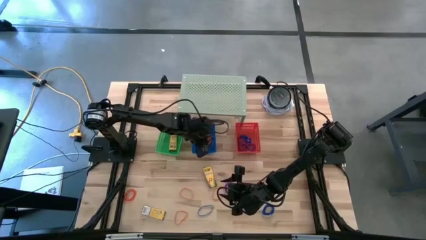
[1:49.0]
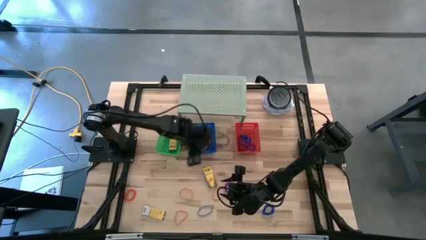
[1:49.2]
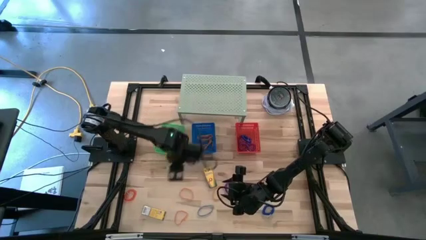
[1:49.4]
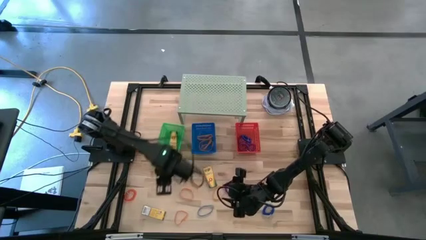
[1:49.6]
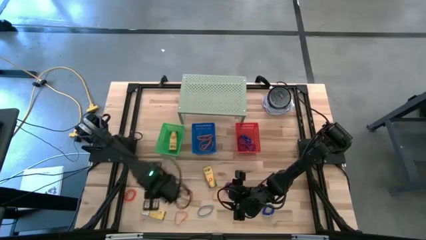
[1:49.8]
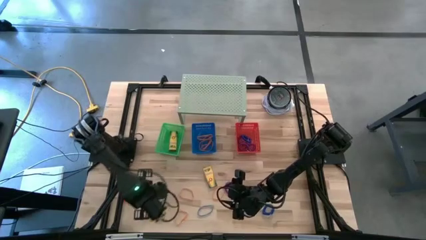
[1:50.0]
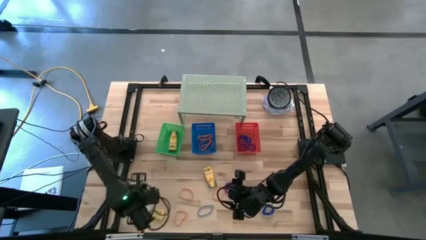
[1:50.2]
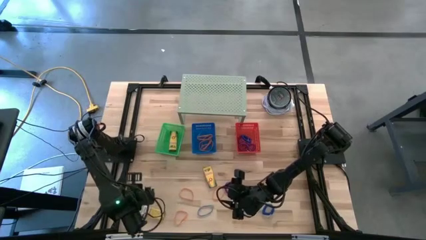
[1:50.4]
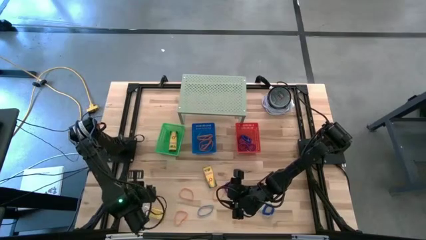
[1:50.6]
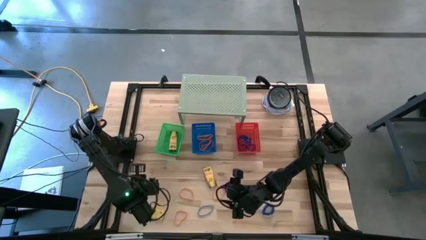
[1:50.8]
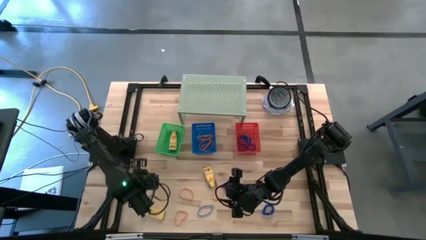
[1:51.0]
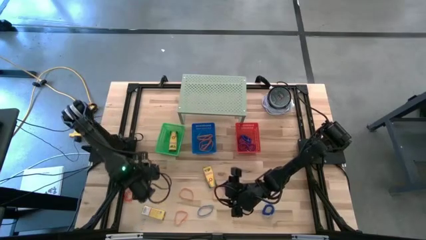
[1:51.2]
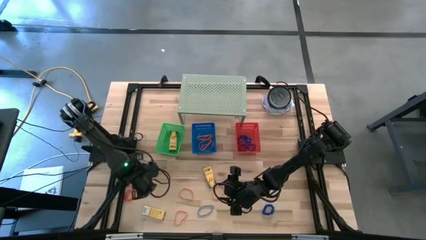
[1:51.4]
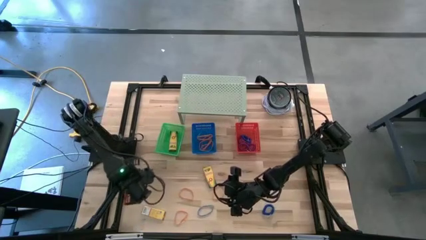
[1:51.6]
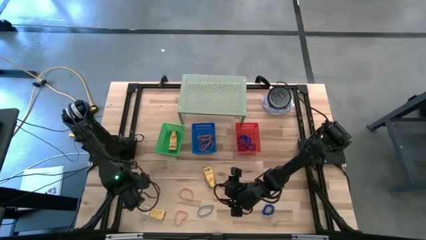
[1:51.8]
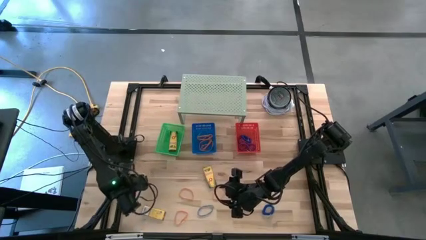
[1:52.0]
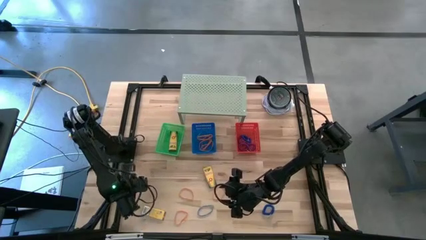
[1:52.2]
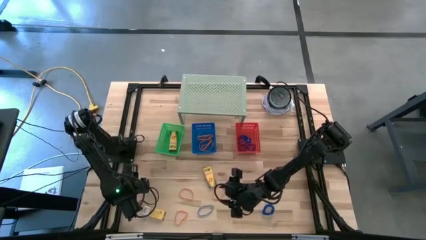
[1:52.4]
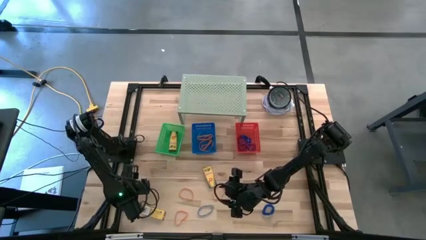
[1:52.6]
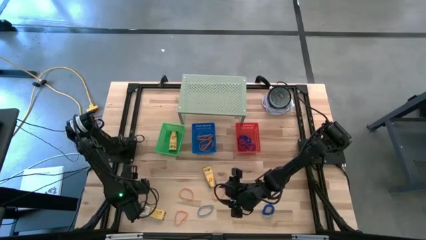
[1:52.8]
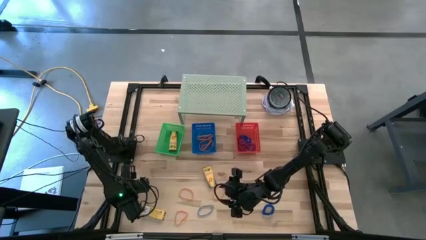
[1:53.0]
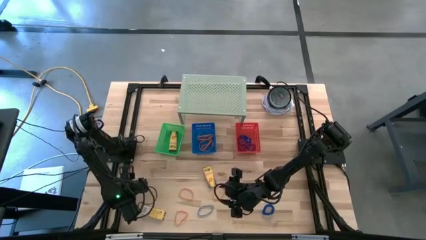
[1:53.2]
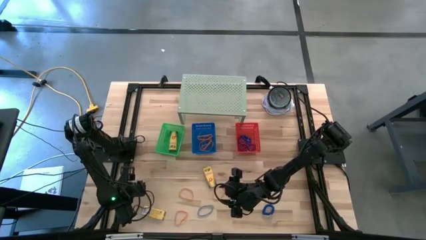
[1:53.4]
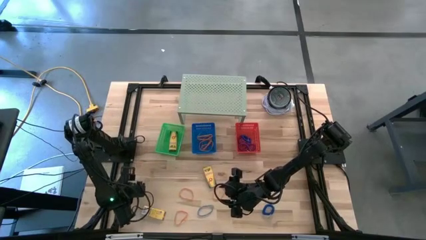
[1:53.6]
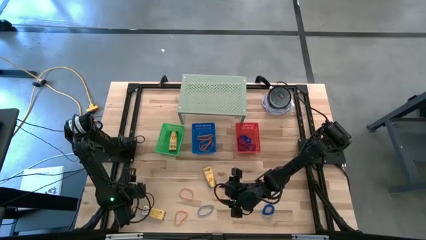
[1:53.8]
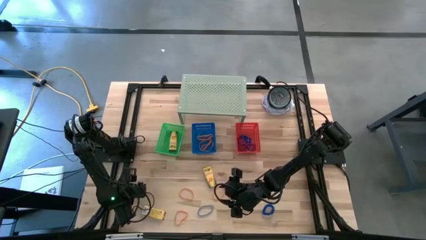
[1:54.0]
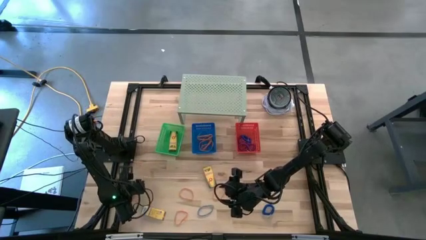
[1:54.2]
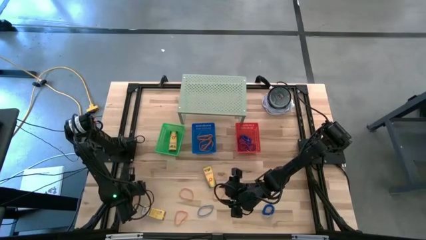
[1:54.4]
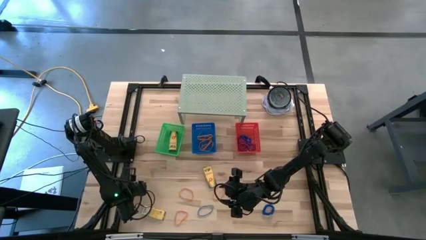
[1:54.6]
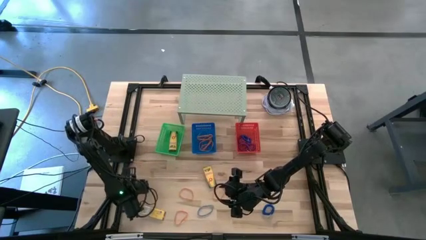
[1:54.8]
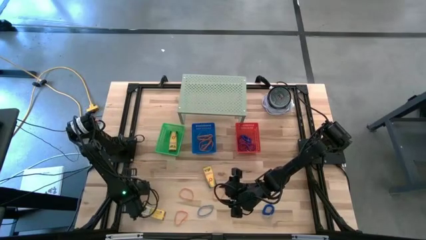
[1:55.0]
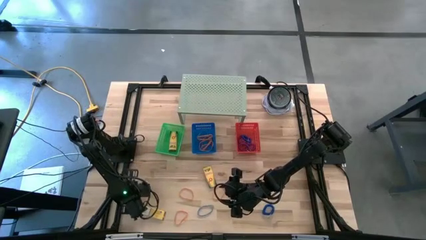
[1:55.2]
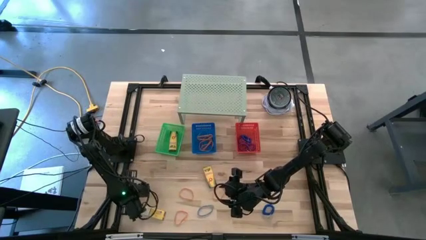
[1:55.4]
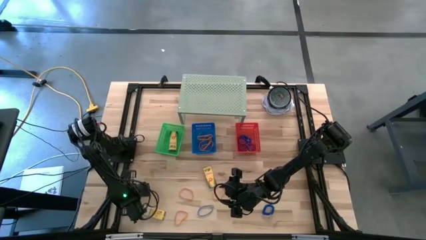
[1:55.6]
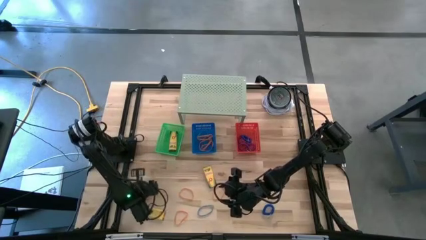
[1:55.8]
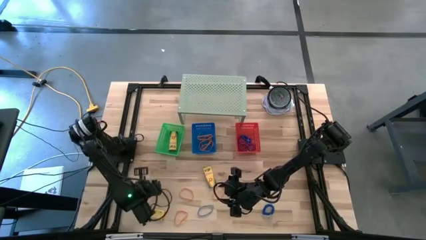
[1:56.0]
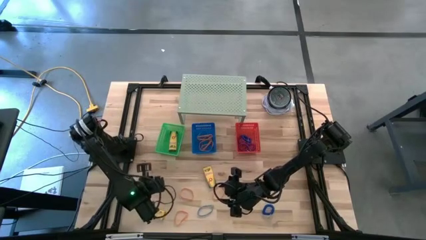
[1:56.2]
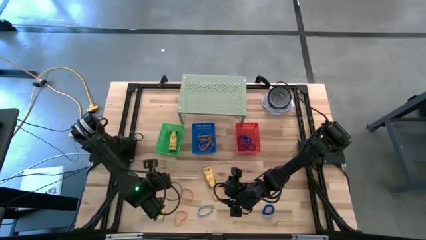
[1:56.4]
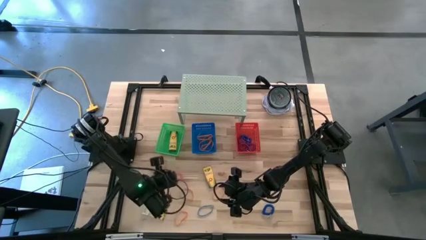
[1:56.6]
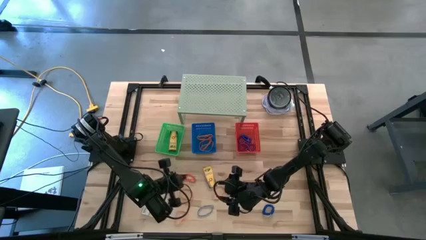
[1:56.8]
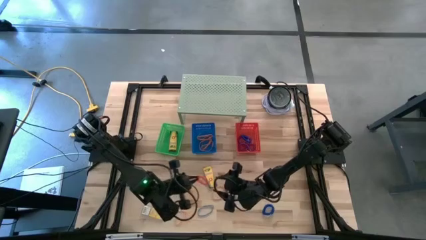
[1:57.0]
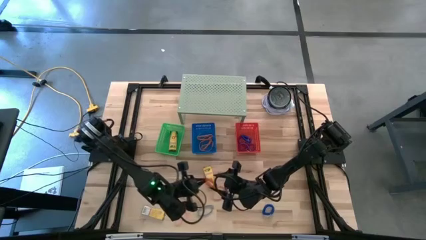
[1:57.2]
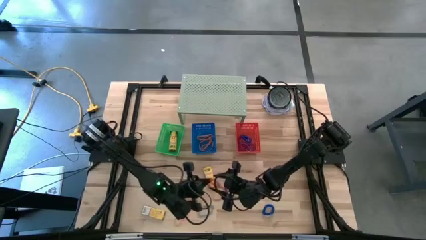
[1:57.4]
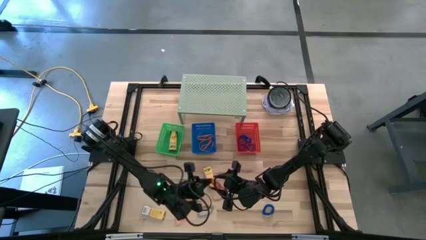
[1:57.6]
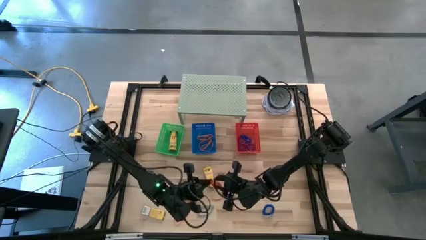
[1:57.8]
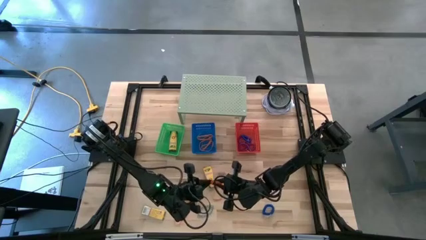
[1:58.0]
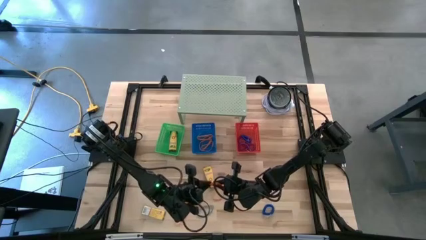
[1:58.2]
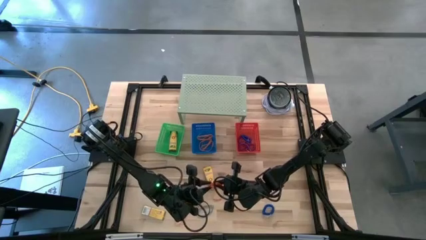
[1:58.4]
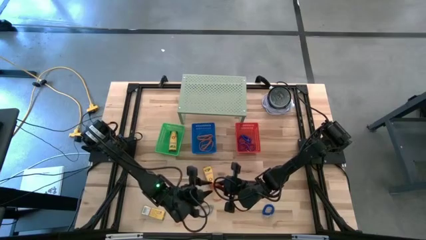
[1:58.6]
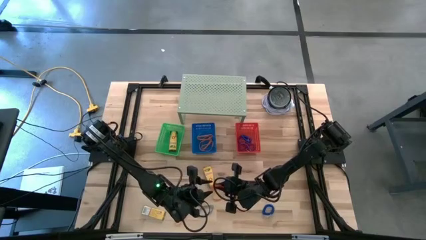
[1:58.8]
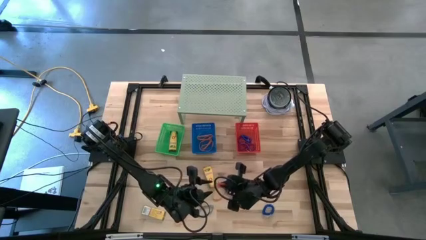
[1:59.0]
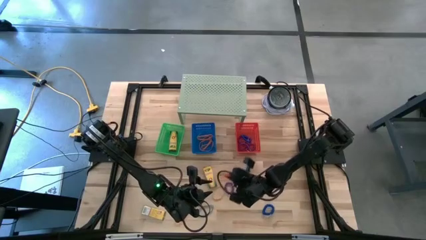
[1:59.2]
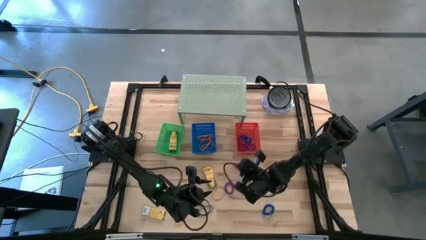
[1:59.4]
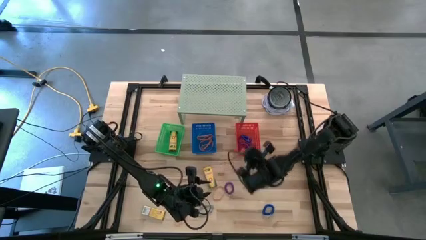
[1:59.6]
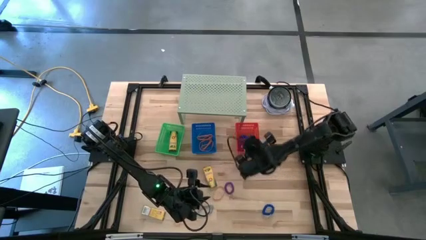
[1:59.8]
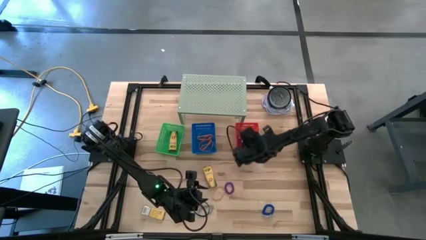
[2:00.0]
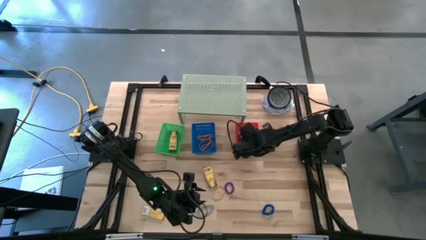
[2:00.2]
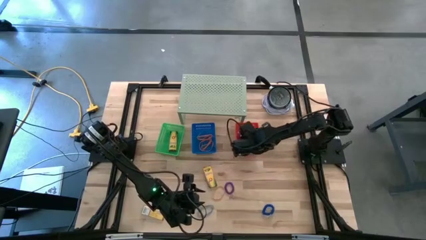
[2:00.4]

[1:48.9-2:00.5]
Task: Pick & Place Office Desk Supplies
Put the orange spring keychain into the red bin

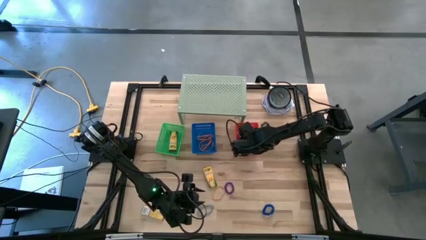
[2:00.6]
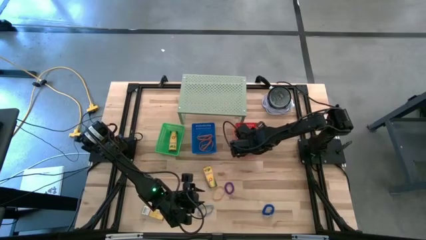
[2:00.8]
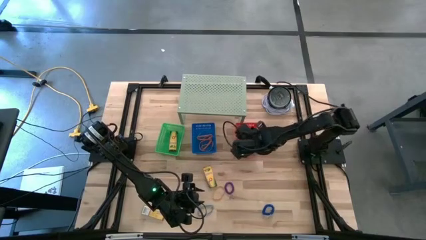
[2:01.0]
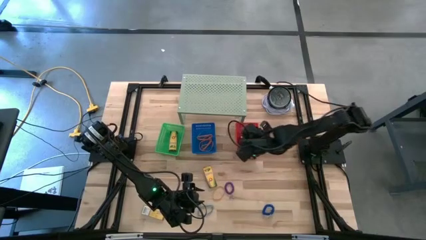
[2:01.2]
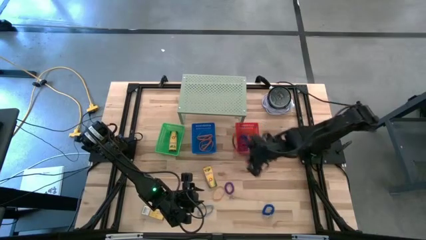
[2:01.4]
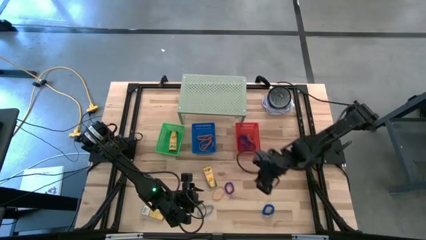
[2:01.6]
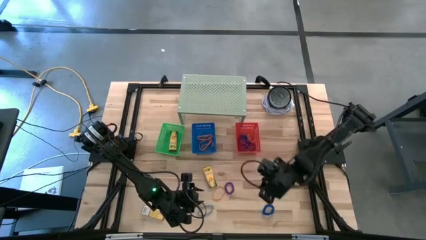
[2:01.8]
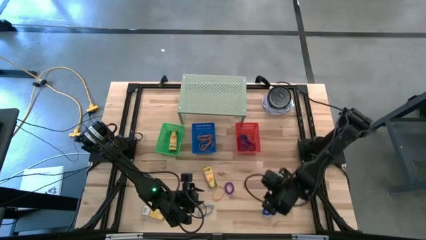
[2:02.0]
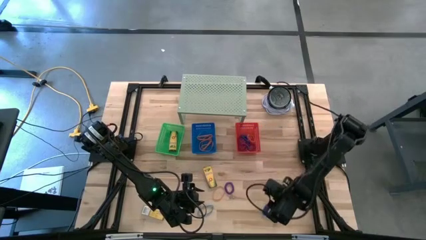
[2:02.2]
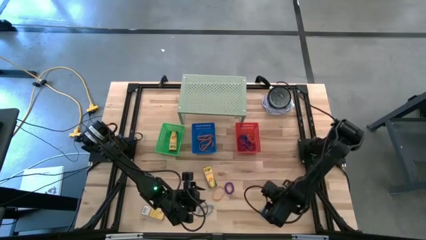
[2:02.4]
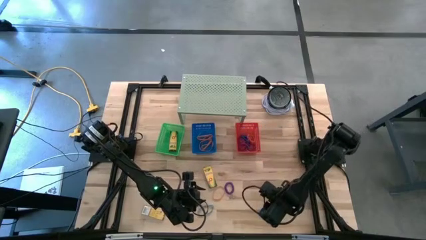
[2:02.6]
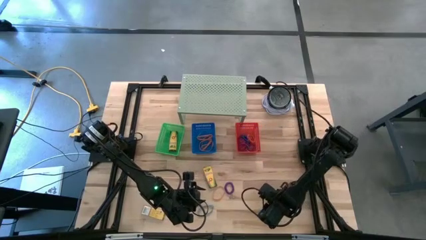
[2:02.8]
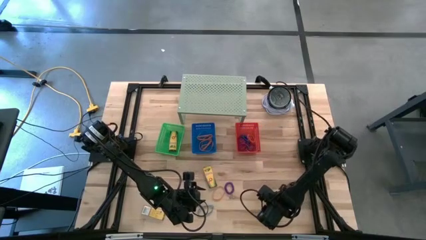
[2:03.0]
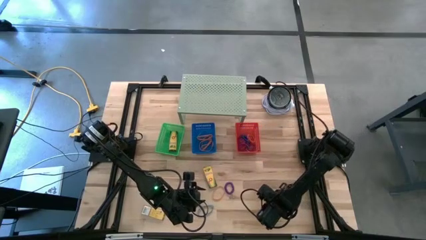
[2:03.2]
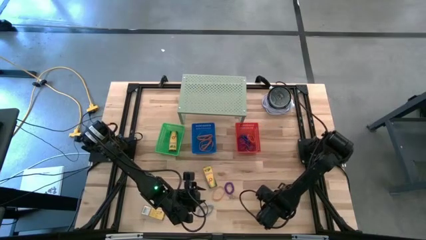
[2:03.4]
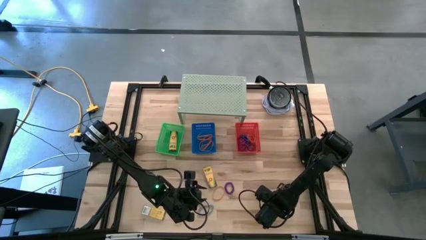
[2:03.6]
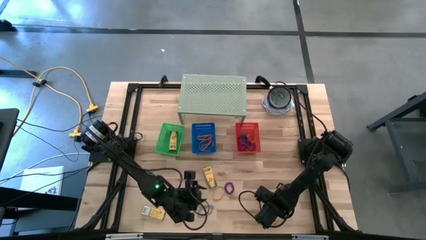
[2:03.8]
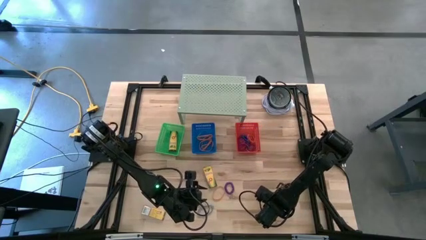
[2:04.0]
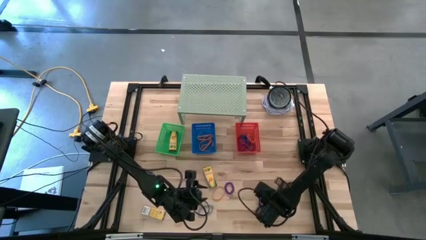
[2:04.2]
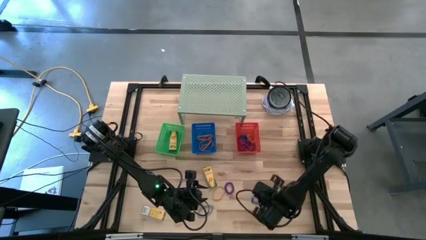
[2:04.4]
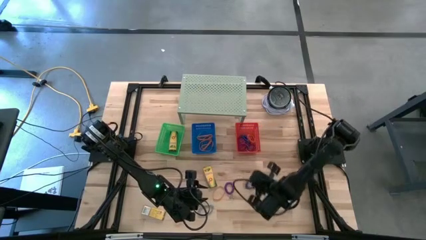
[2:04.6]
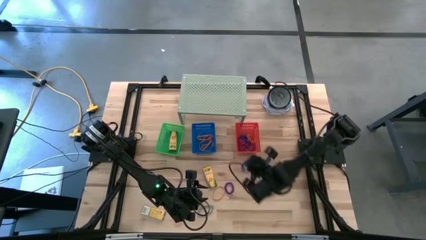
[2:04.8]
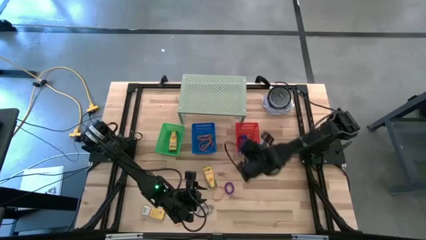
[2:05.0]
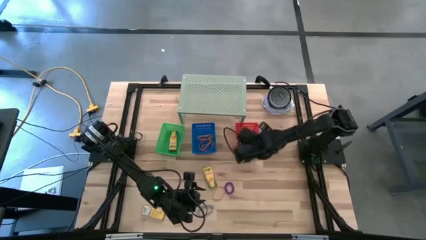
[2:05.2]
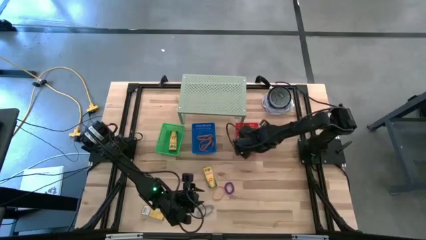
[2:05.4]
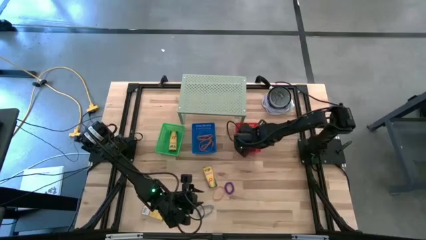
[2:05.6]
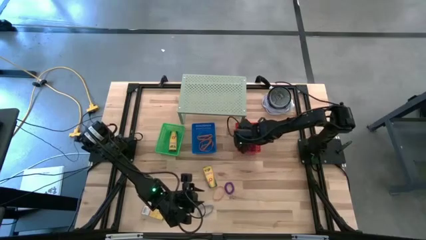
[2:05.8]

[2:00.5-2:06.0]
Put the blue spring keychain into the red bin
